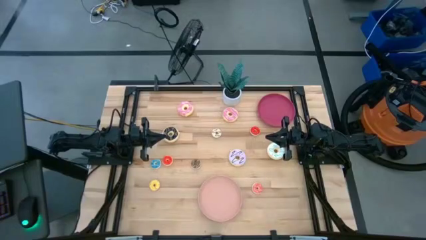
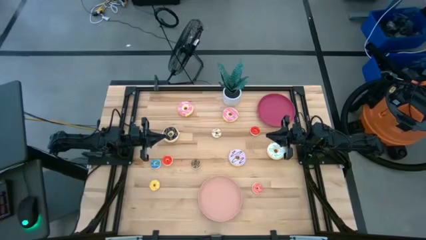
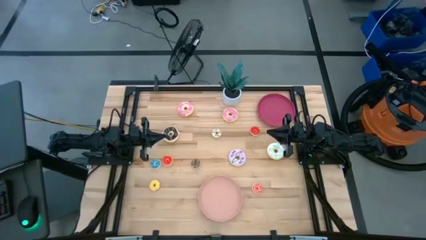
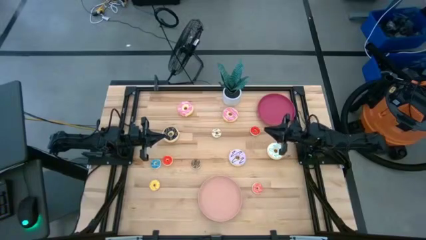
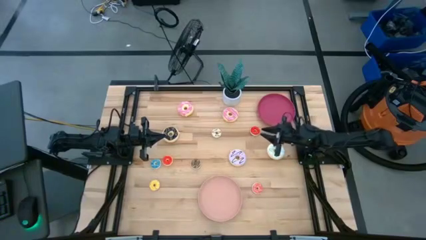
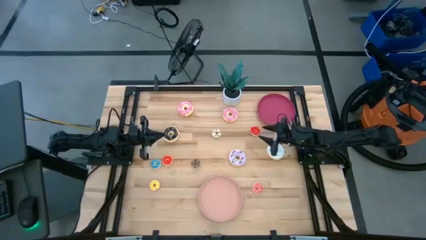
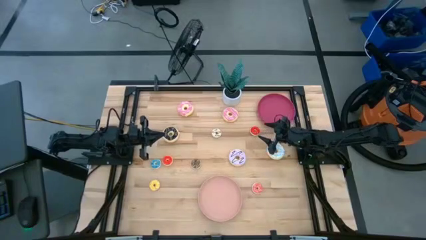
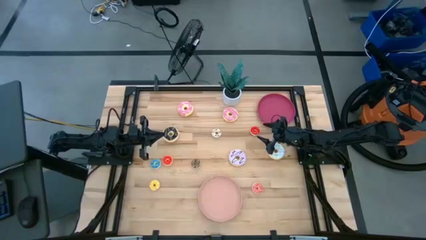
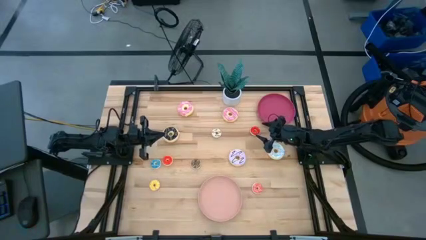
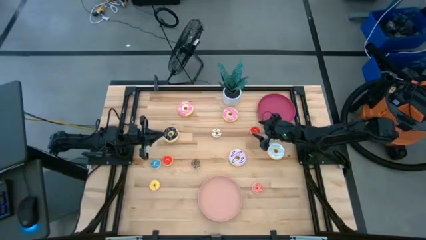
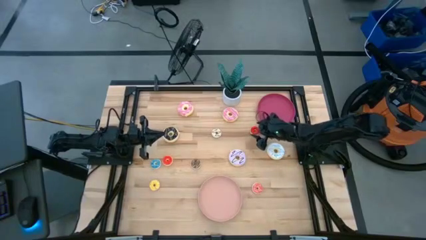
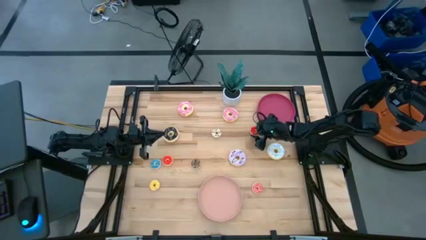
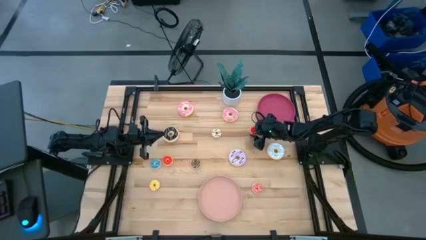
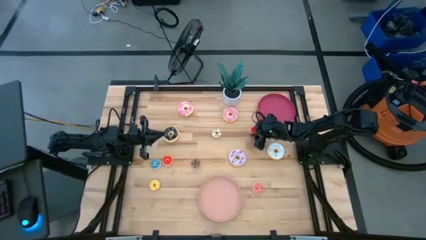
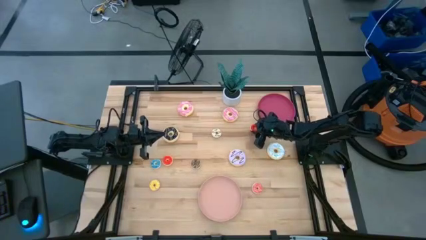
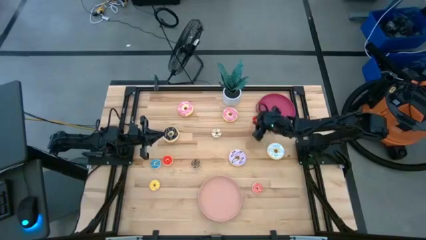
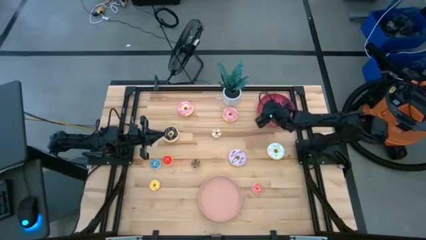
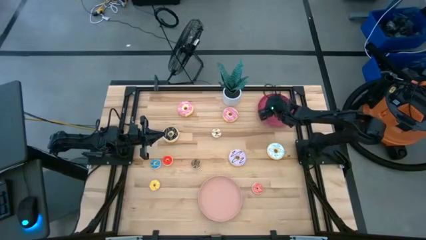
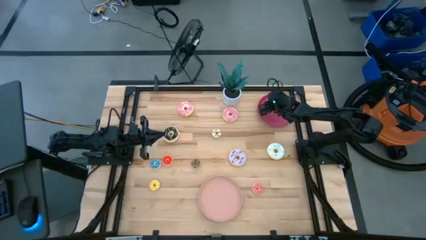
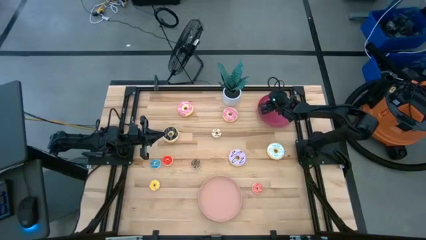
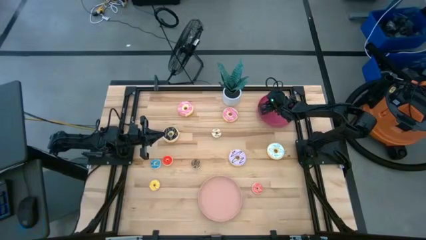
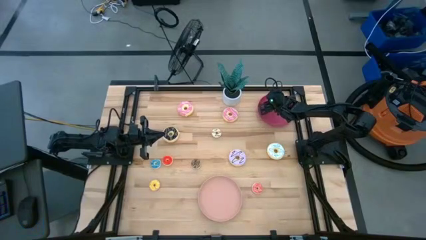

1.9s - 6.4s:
Task: Pick & Place donuts
Put the small red donut on the red plate

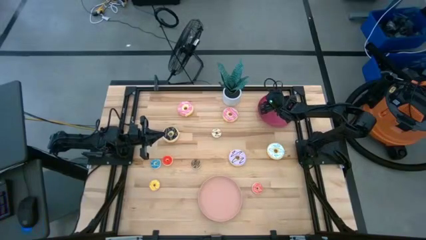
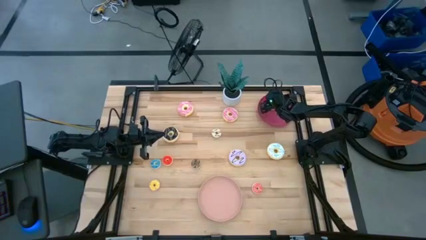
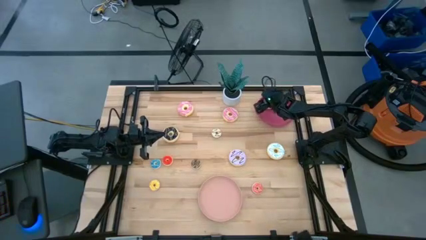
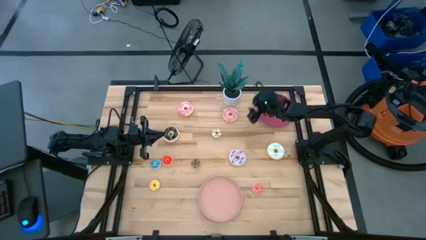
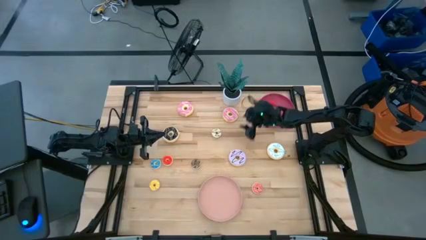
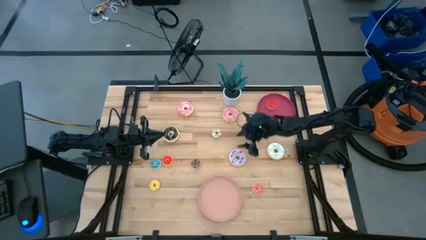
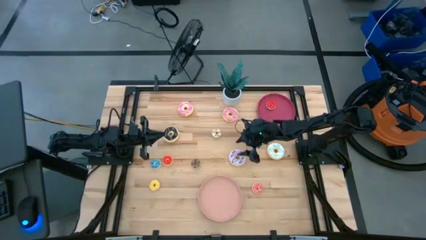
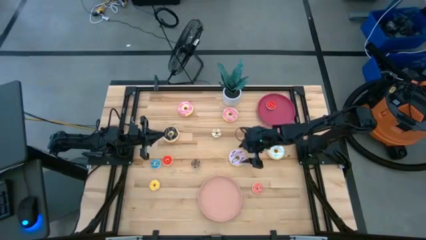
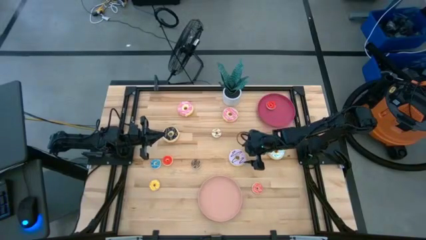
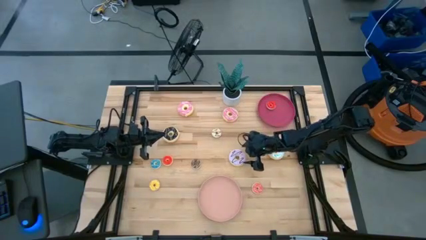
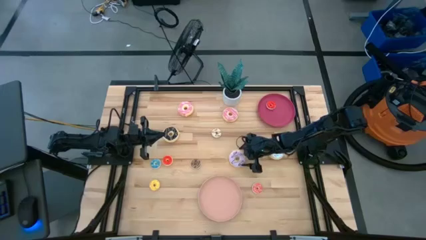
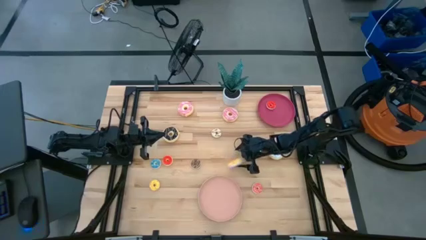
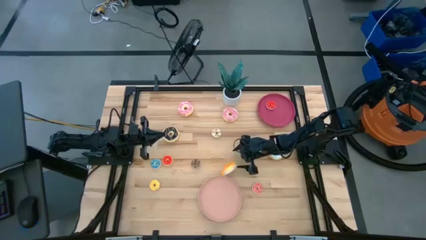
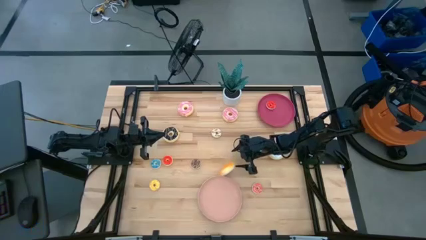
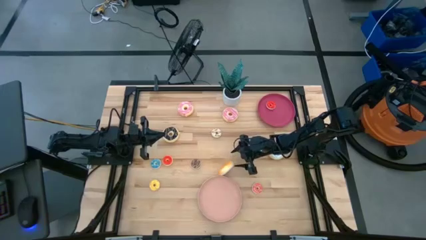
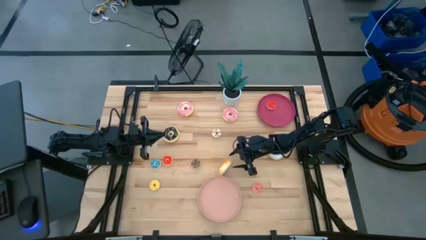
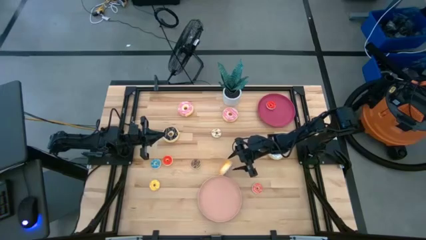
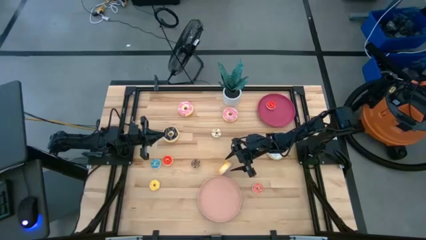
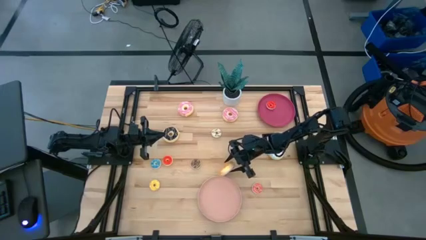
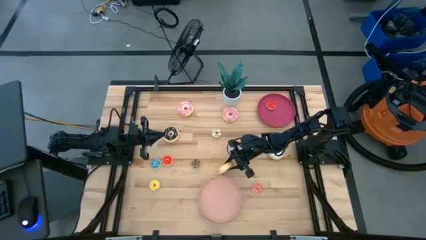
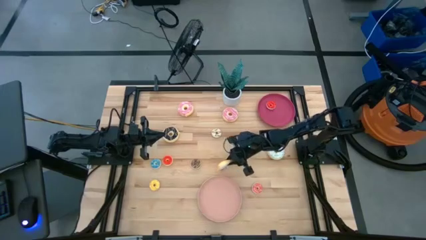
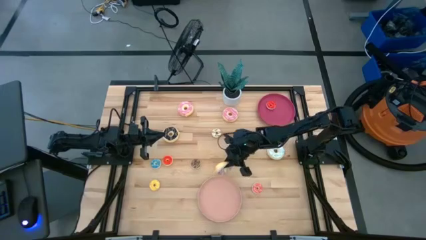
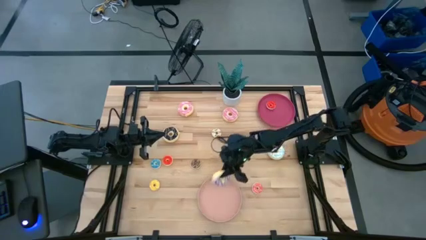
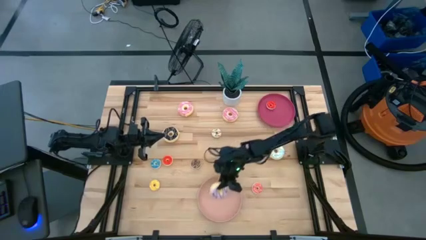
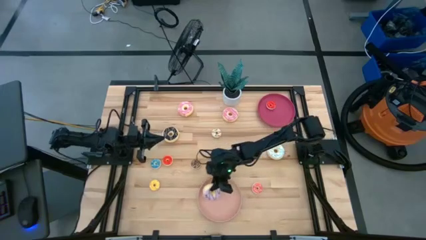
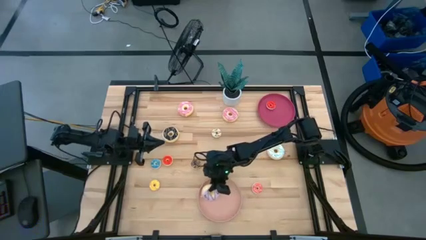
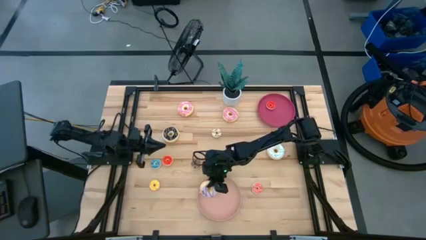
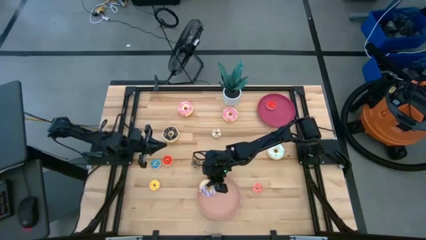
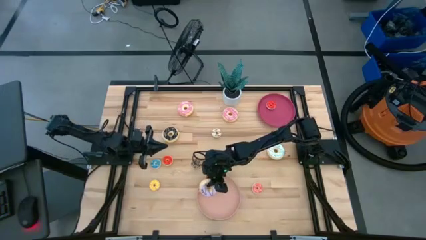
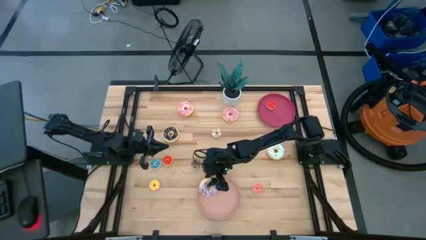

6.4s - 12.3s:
Put the large purple donut on the pink plate

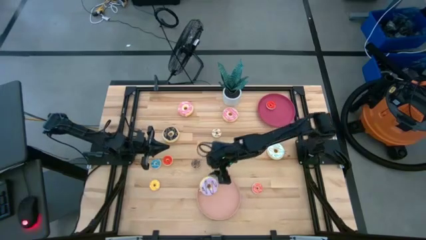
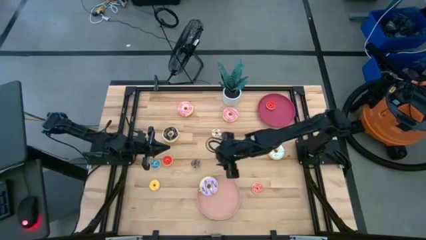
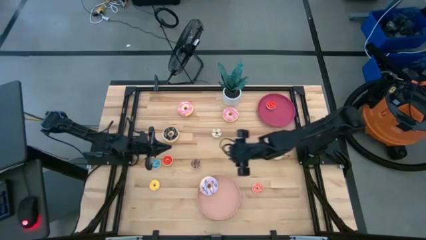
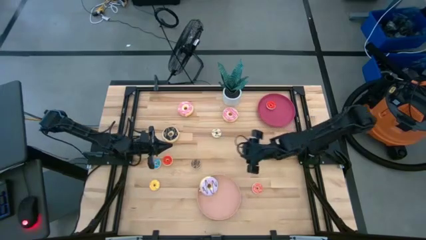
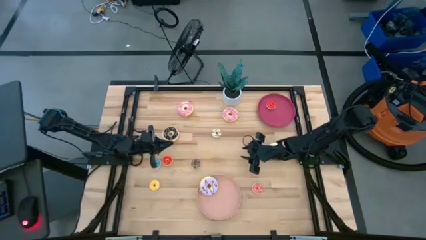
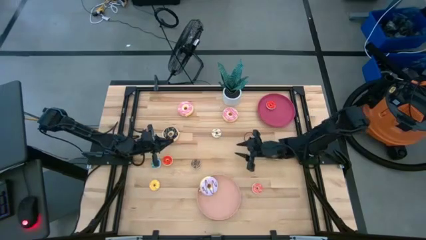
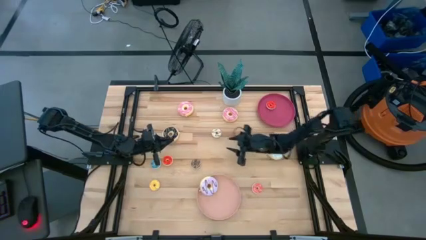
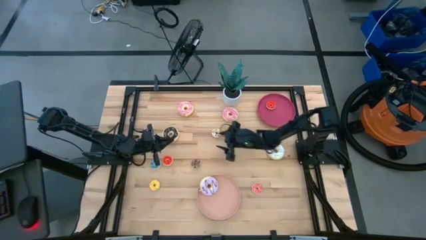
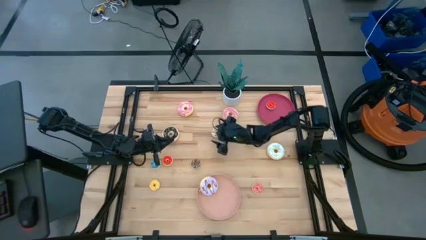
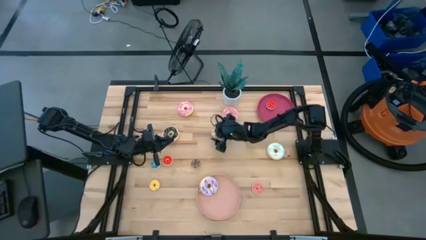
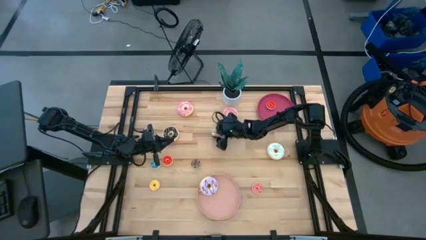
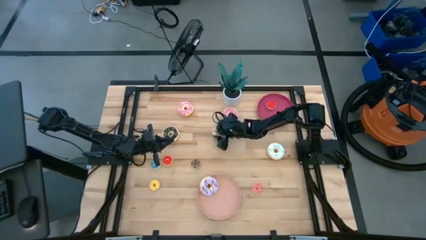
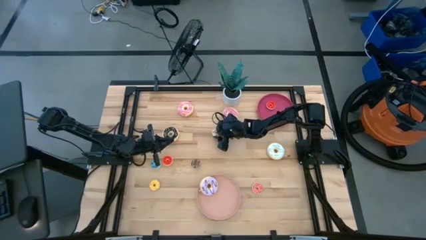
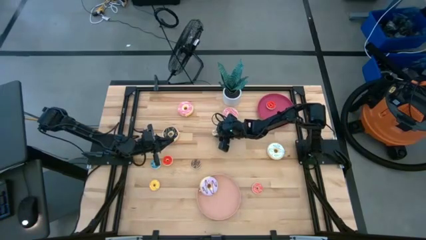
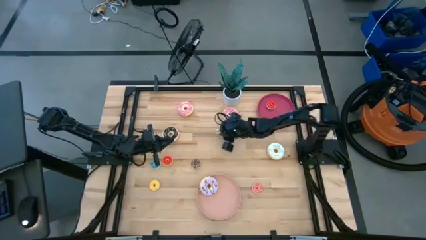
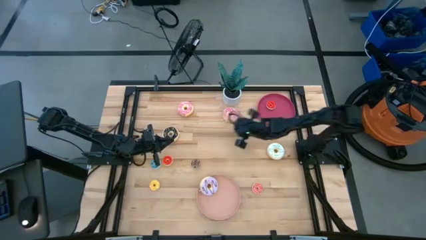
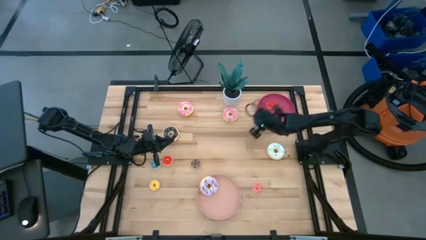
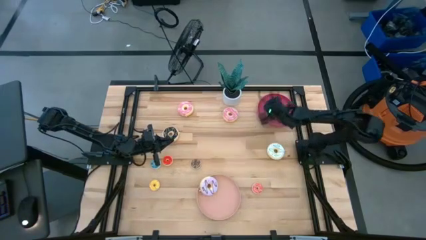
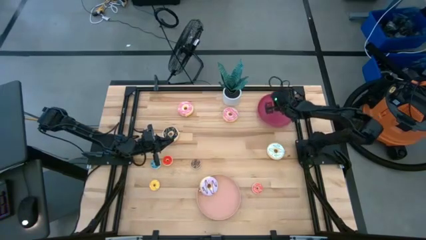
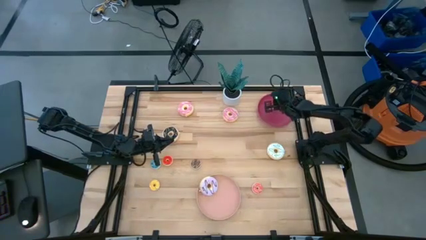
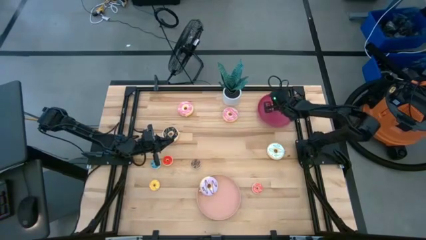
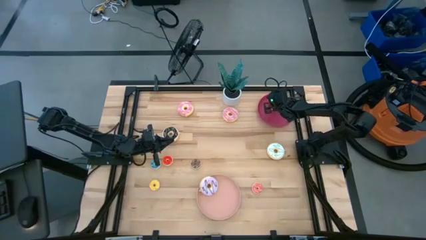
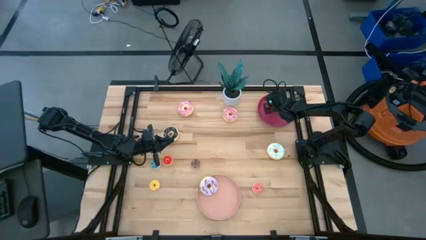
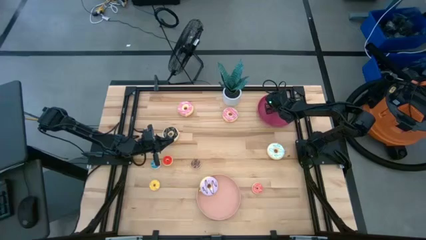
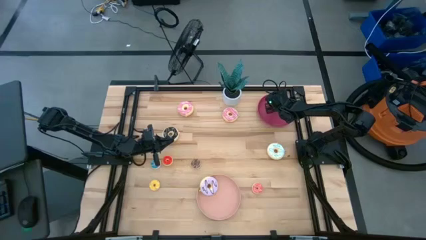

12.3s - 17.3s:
Put the small white donut on the red plate

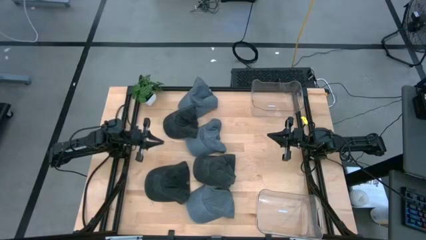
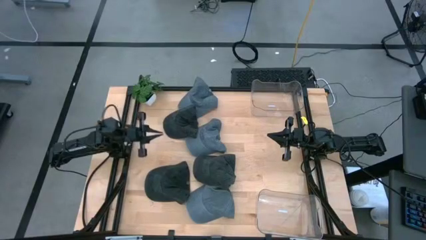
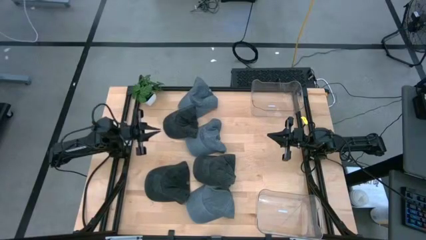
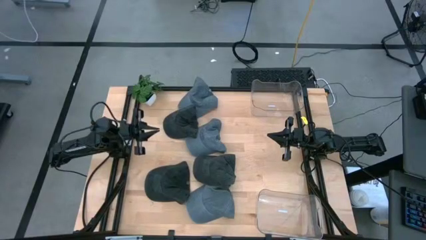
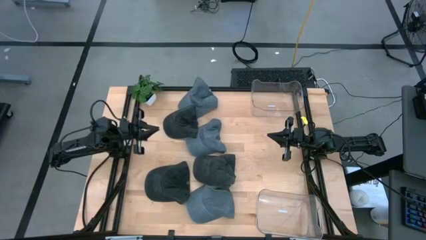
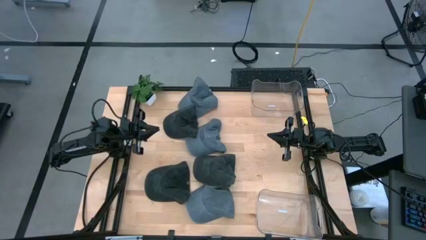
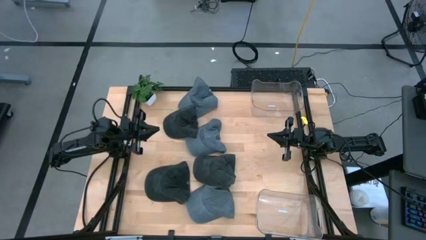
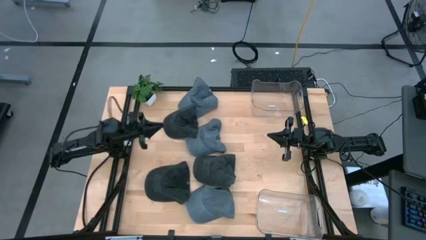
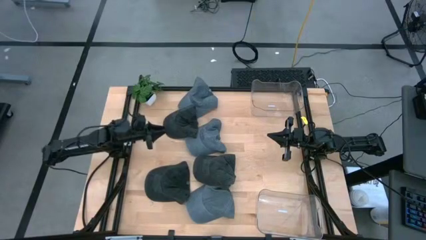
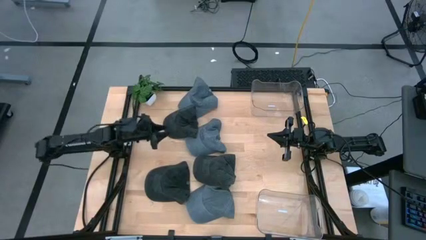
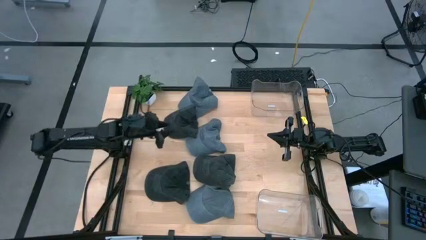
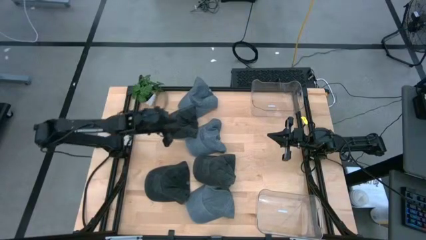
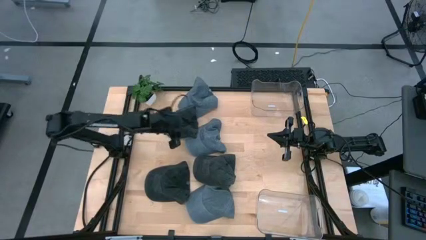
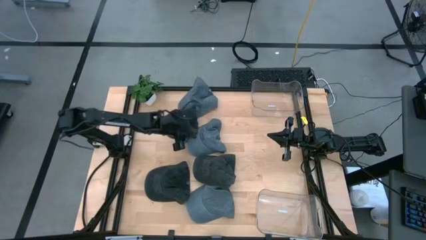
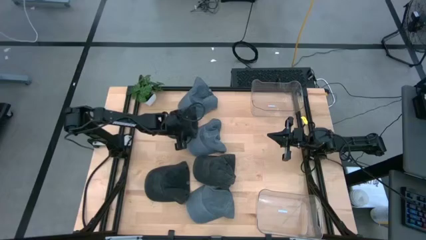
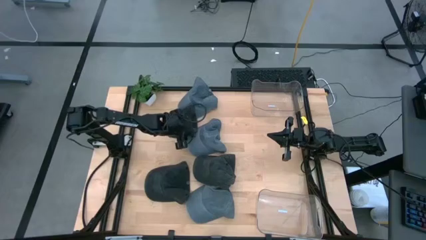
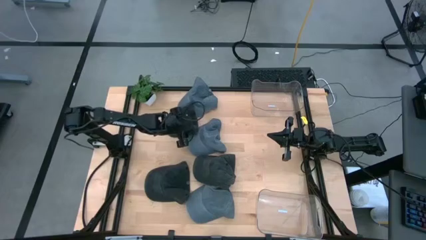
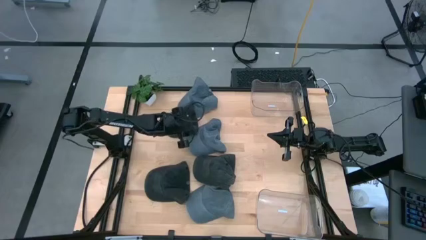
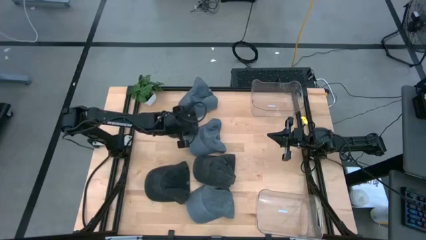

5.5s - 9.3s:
Task: Pick & Place hat
Put the top black cap into the top transparent bin
